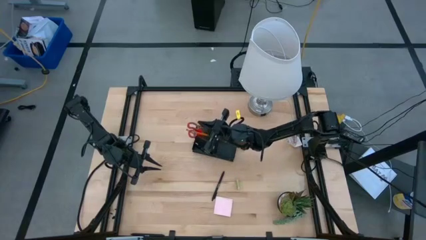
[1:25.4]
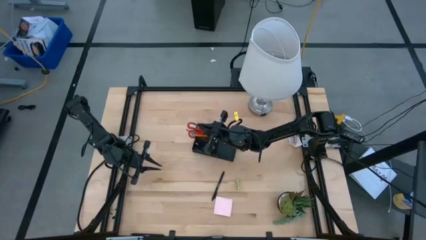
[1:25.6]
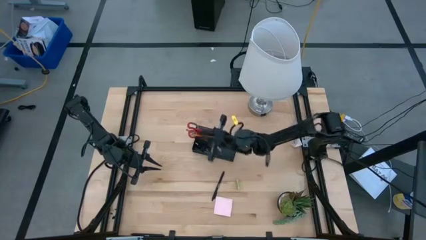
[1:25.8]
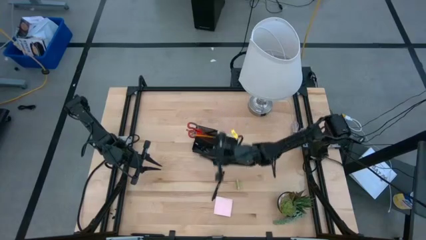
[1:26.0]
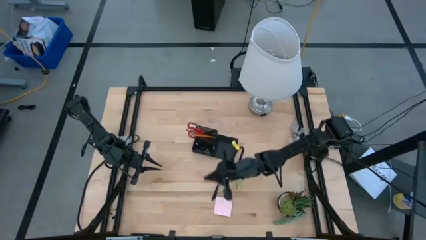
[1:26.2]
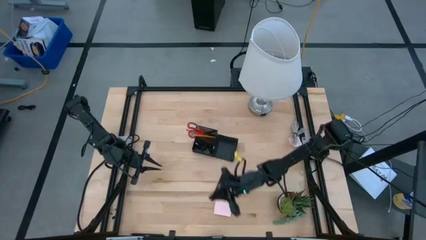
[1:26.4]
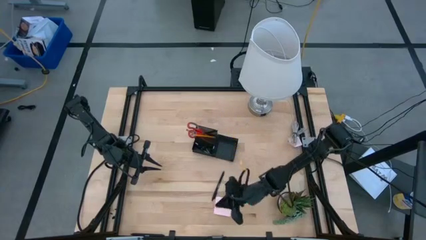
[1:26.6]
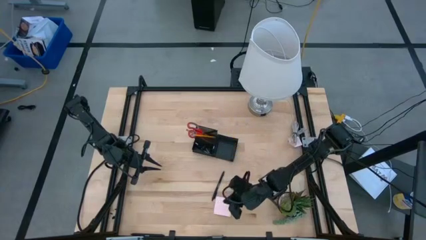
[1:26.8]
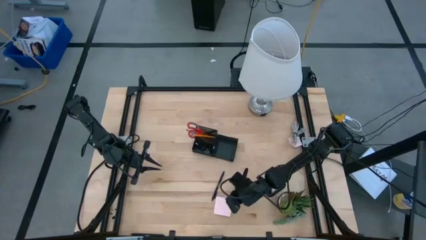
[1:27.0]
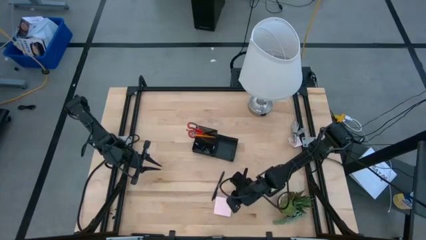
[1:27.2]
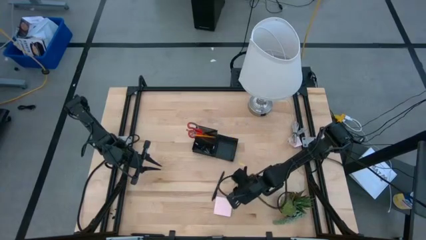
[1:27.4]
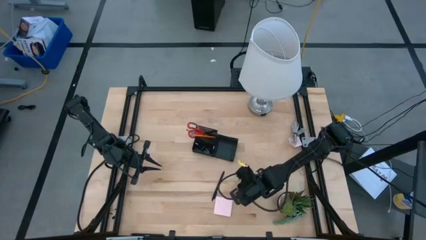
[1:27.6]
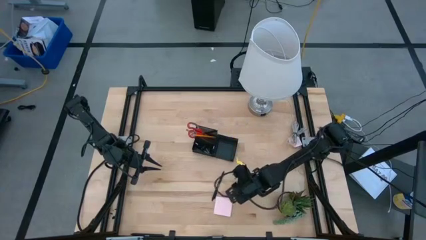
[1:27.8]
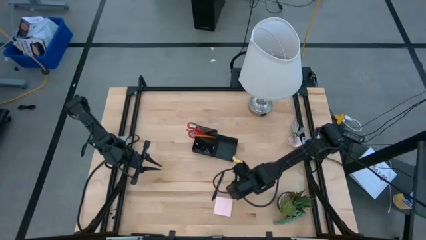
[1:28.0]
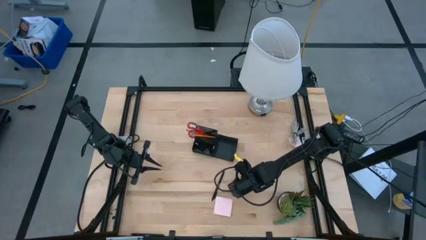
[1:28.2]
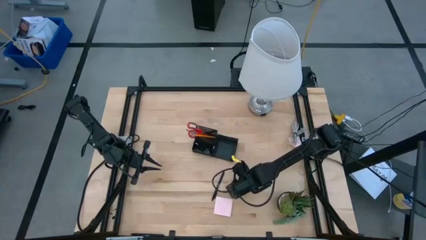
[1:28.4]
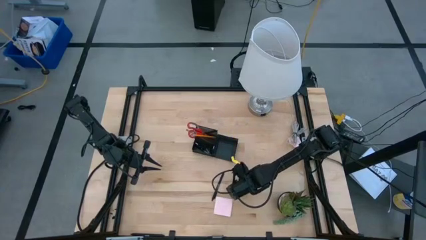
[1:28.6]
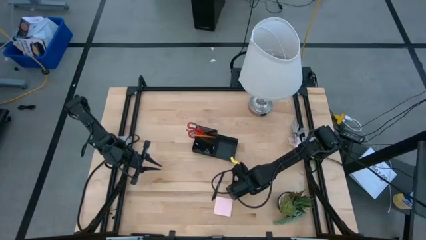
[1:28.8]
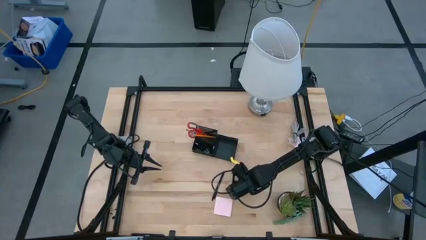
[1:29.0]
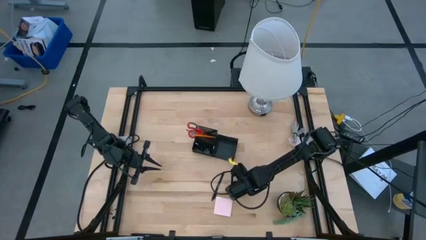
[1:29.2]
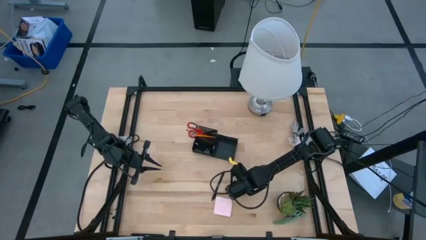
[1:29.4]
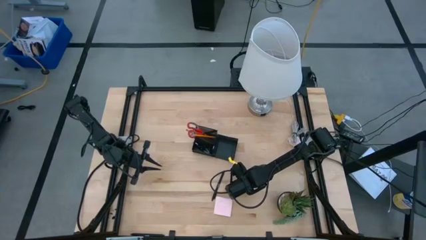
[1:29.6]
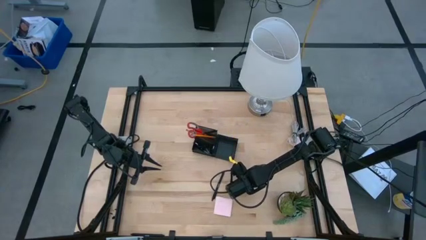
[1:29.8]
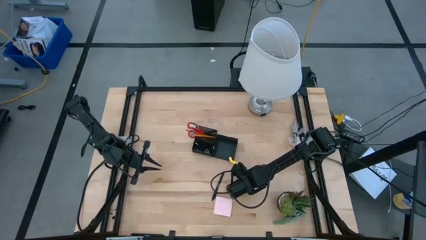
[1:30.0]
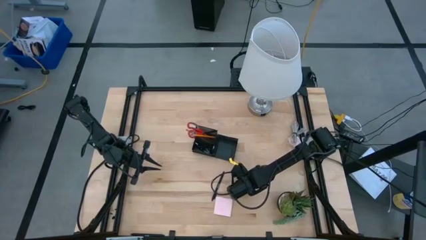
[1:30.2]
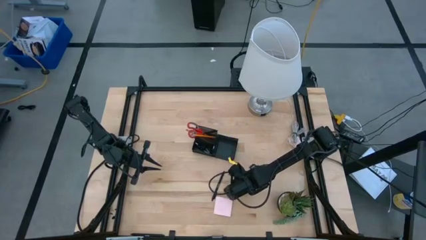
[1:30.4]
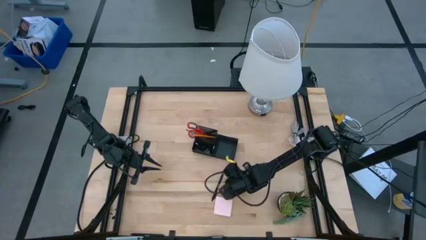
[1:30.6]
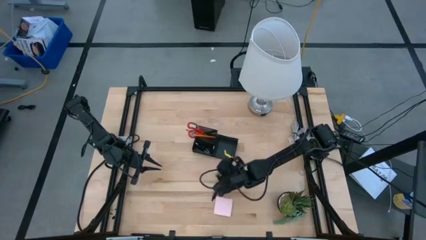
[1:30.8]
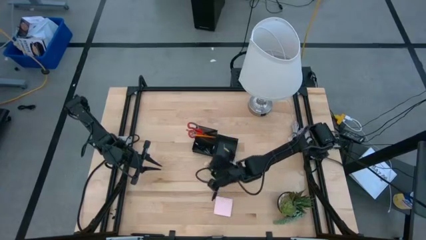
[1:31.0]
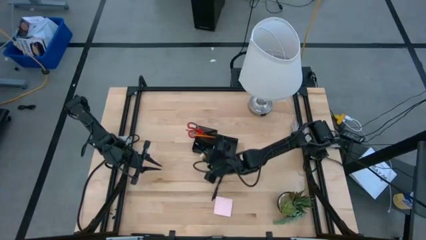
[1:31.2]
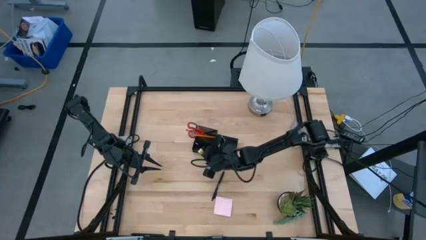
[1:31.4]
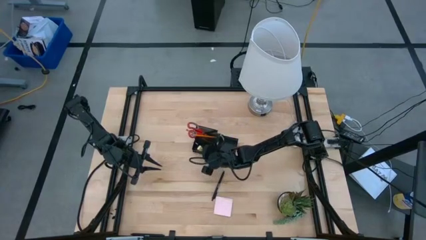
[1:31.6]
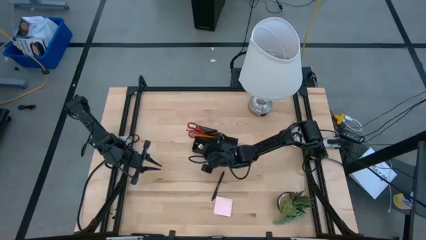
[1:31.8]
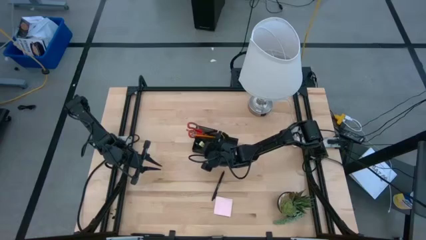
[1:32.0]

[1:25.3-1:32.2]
Task: Pick and place office supplies into organizer
Put the yellow eraser into the black desk organizer

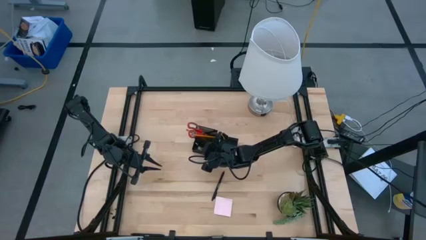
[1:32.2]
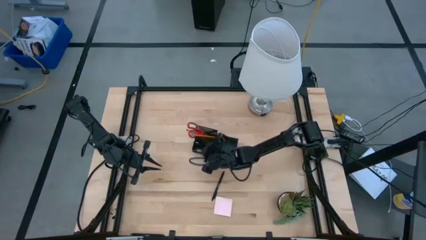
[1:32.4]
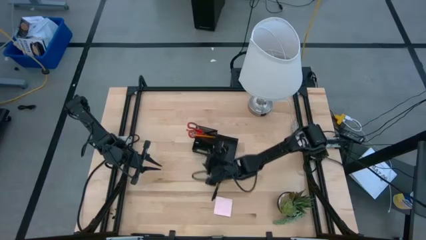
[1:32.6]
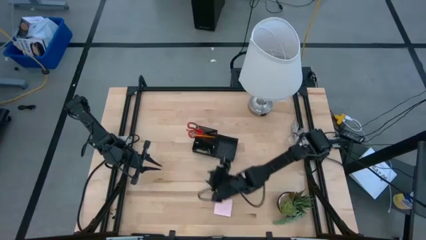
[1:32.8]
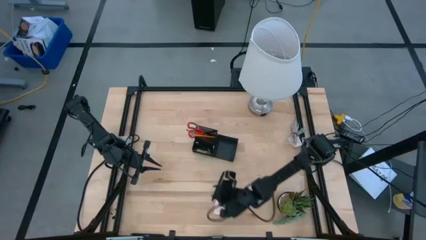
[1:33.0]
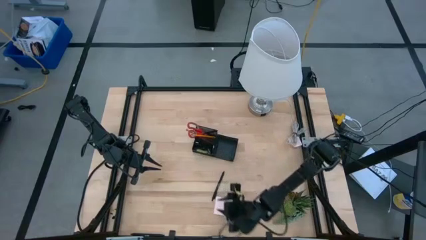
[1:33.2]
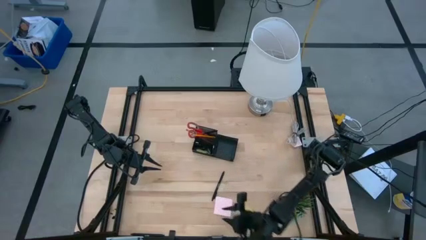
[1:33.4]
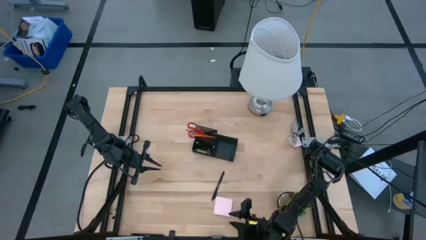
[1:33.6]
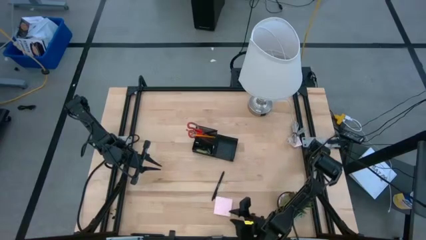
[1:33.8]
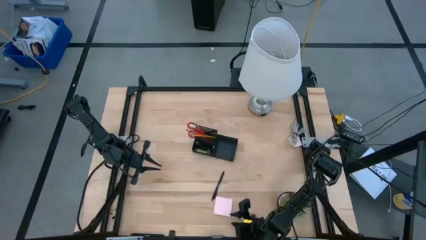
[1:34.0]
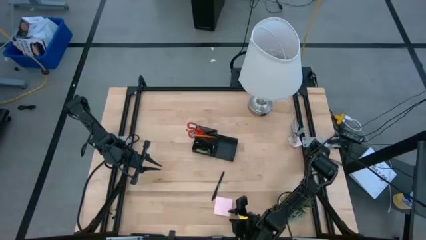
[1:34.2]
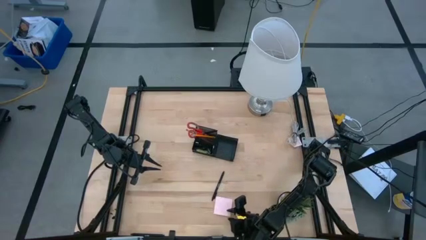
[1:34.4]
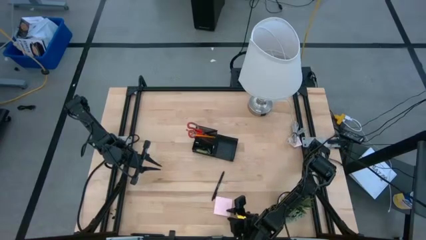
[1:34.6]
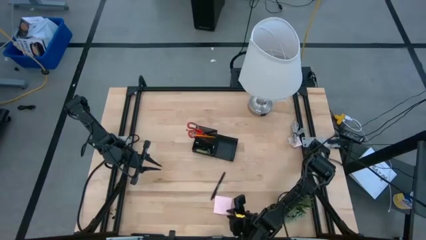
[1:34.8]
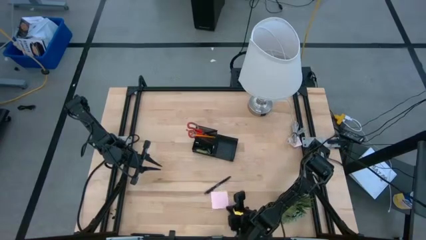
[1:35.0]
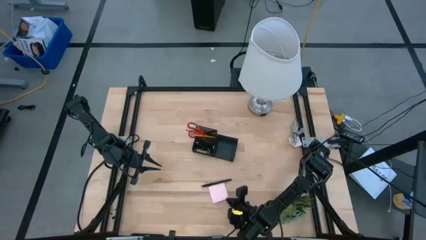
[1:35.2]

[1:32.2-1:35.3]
Put the pink sticky notes into the black desk organizer

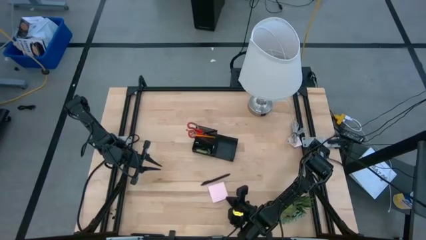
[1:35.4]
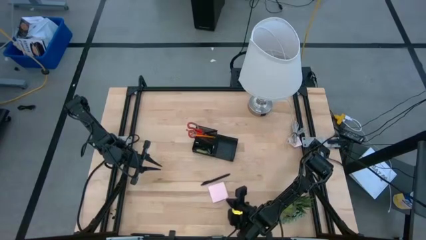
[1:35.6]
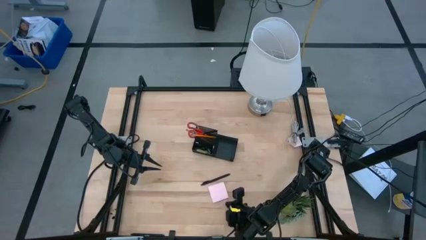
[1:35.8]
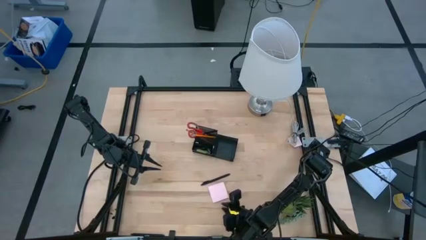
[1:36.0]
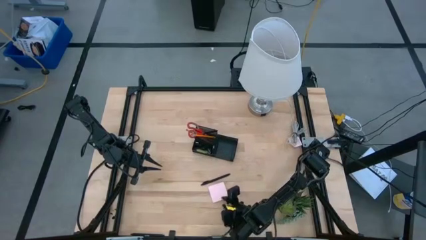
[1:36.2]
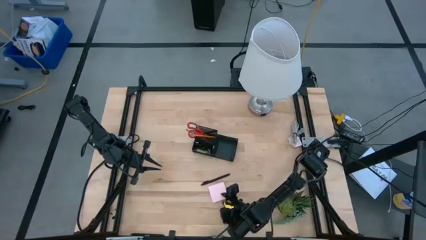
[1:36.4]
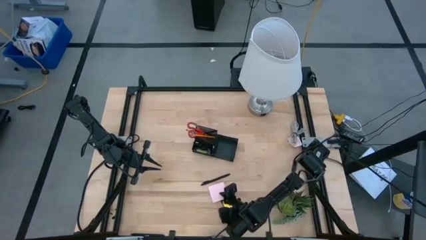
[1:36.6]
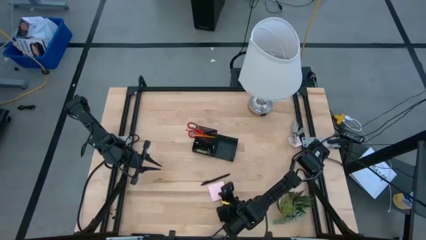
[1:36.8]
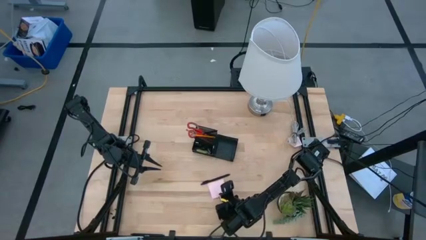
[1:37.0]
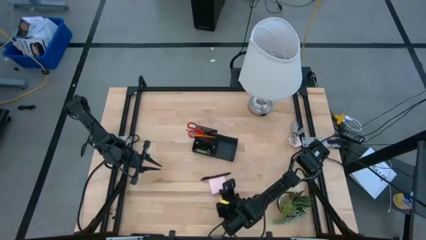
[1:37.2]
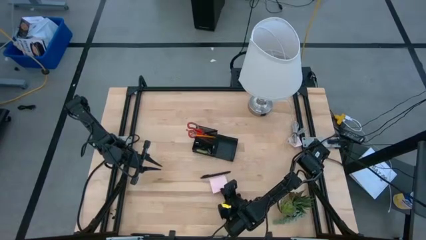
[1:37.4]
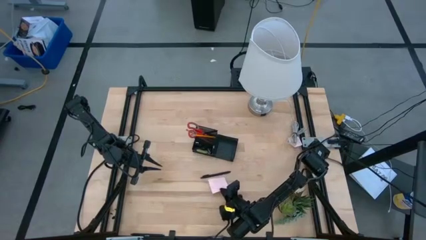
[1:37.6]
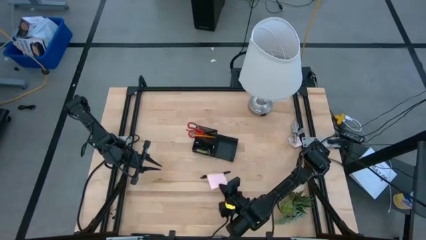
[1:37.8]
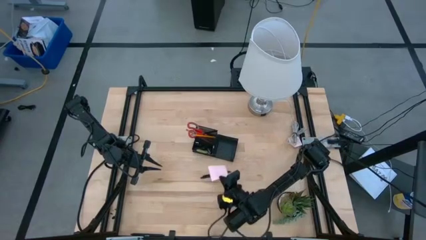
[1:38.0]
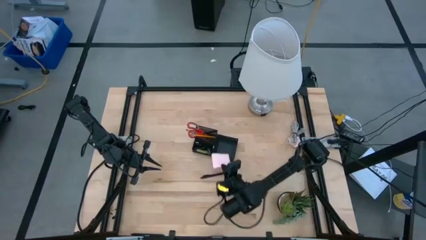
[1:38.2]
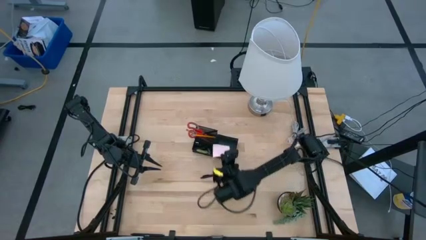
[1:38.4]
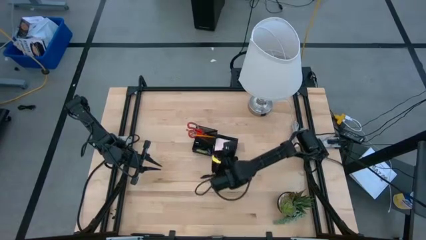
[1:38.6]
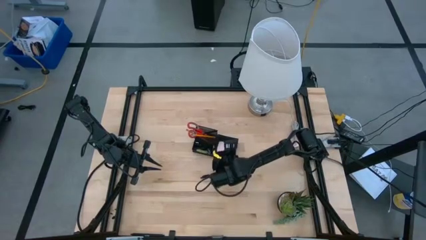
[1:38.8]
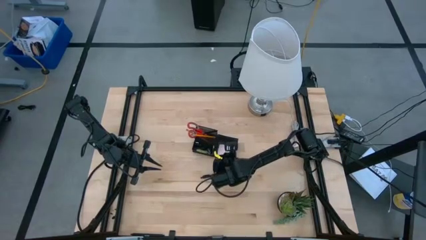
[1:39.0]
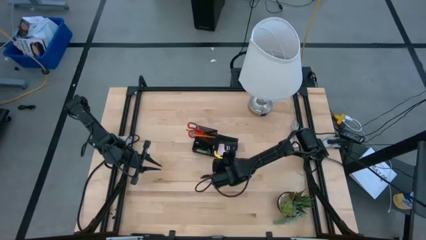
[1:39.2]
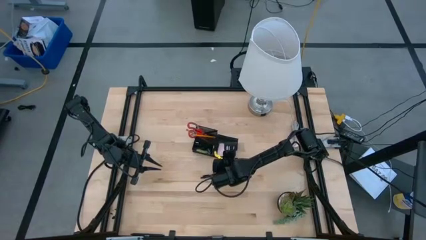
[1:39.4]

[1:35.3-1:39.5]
Put the pink sticky notes into the black desk organizer

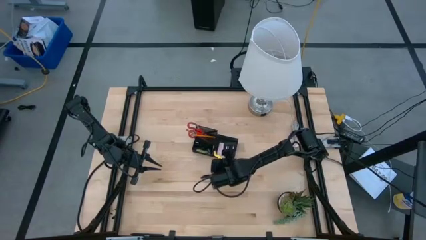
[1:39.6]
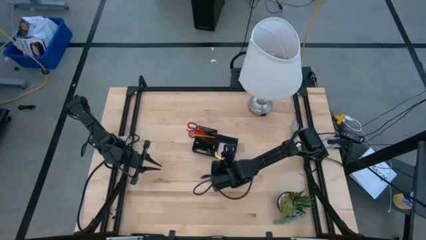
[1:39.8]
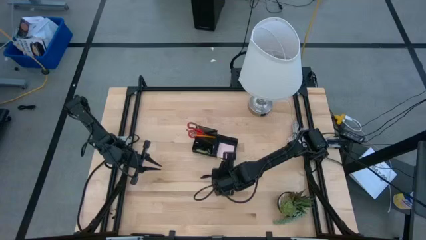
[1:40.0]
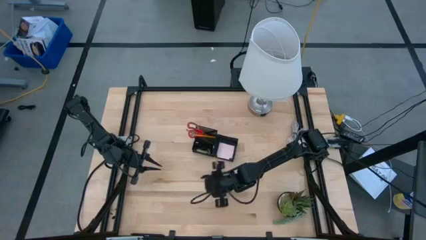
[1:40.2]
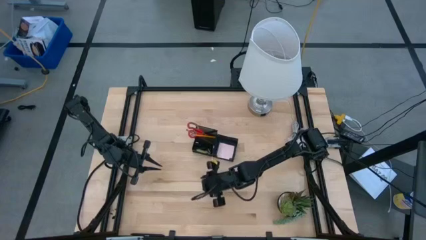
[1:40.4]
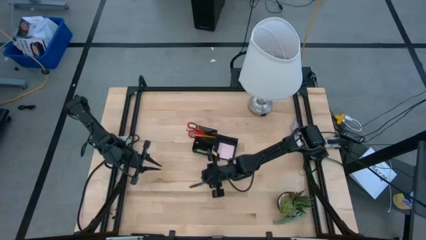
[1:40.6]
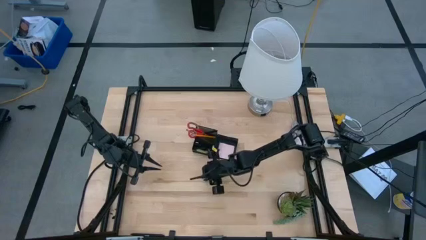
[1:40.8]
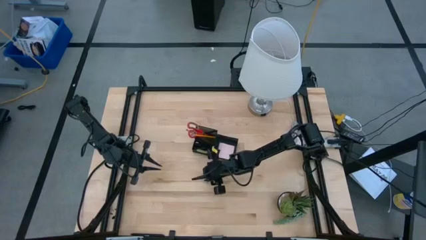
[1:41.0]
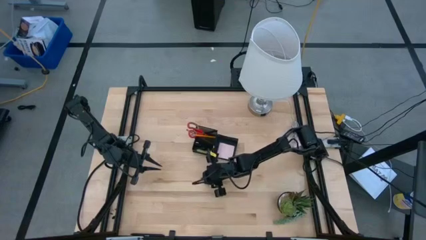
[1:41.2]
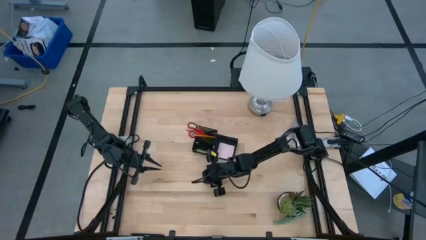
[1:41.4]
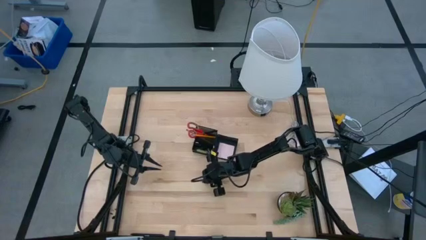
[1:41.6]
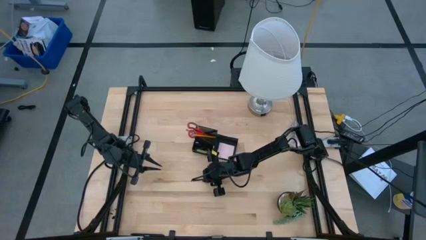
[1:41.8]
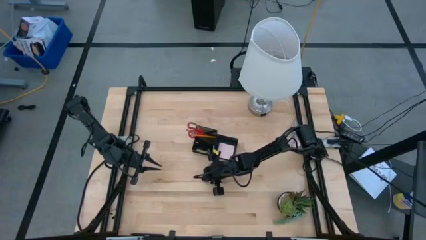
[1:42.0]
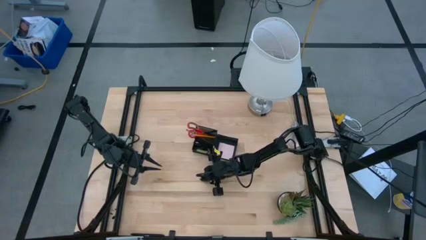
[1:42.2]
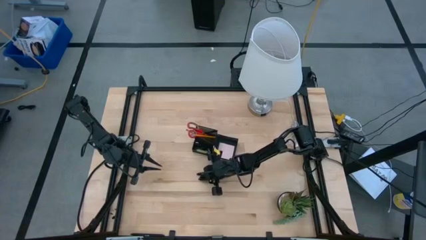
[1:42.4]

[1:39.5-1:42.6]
Put the black pen into the black desk organizer
